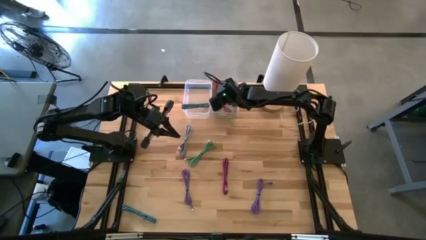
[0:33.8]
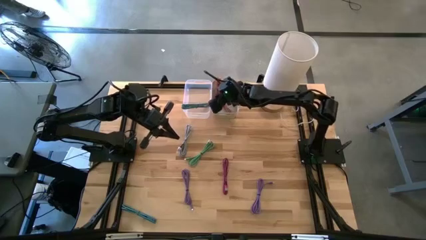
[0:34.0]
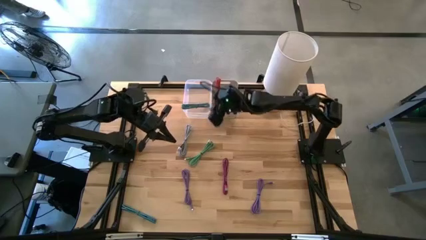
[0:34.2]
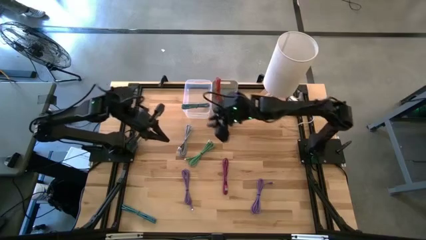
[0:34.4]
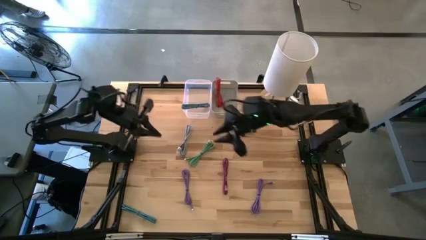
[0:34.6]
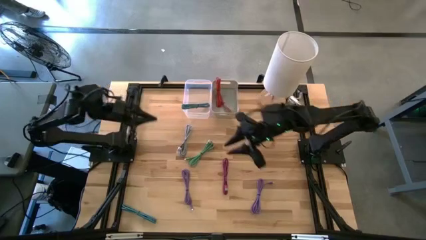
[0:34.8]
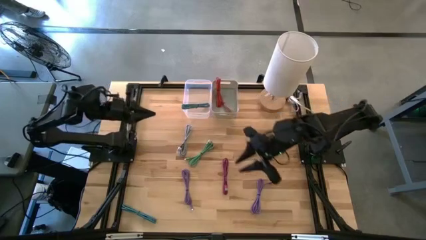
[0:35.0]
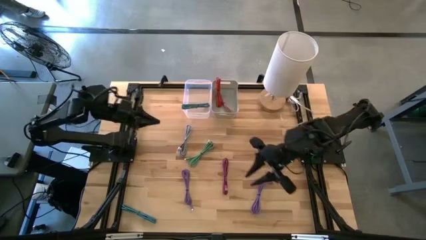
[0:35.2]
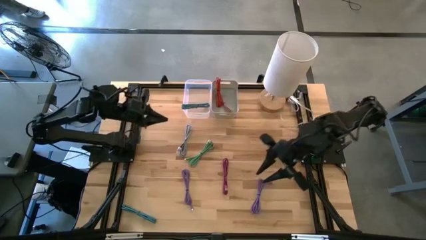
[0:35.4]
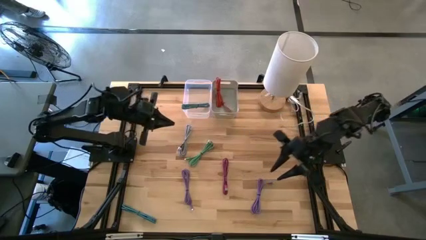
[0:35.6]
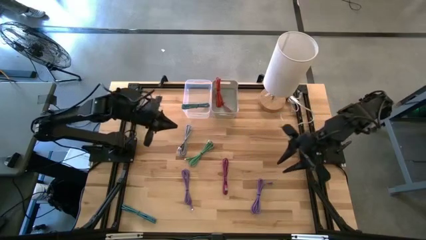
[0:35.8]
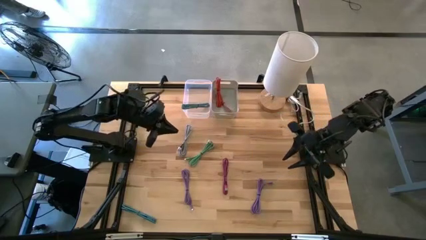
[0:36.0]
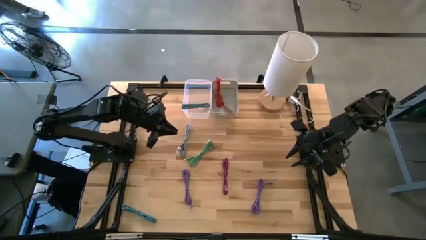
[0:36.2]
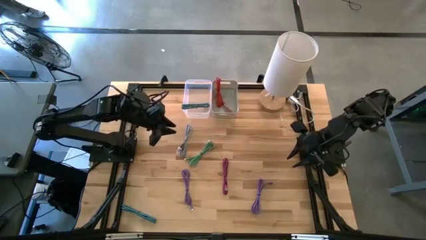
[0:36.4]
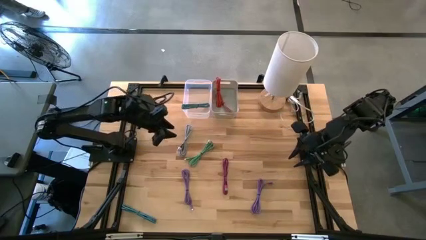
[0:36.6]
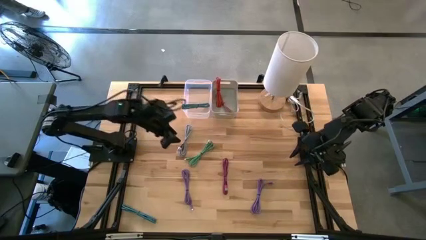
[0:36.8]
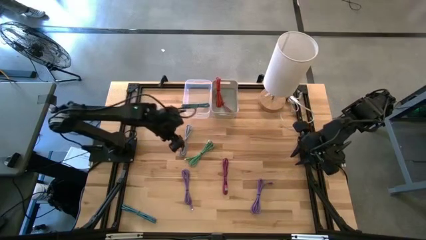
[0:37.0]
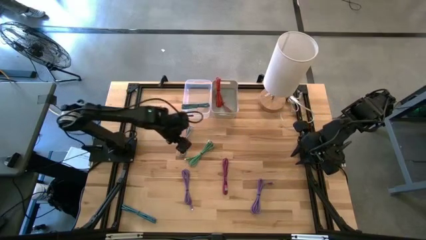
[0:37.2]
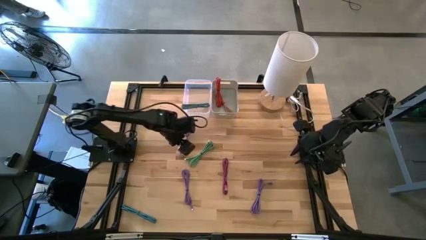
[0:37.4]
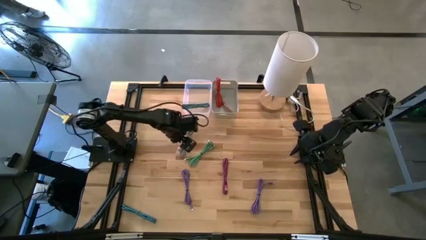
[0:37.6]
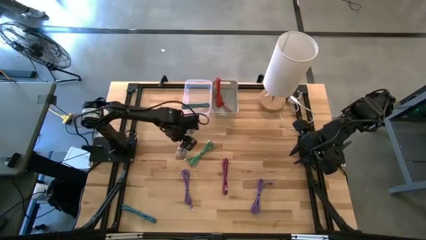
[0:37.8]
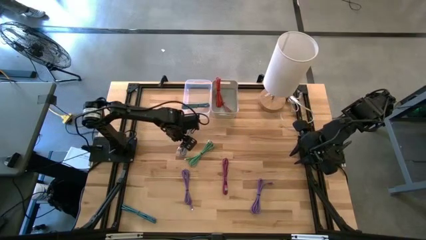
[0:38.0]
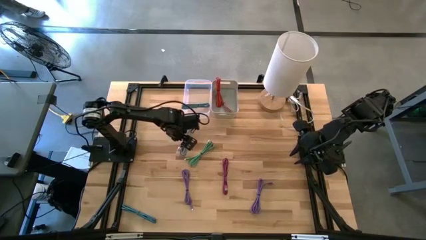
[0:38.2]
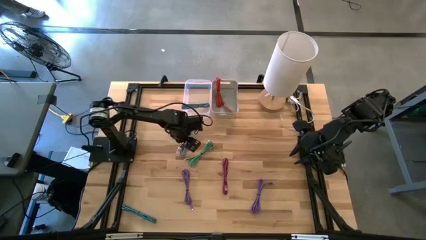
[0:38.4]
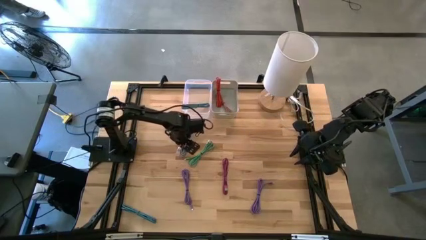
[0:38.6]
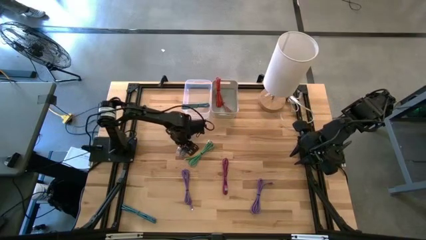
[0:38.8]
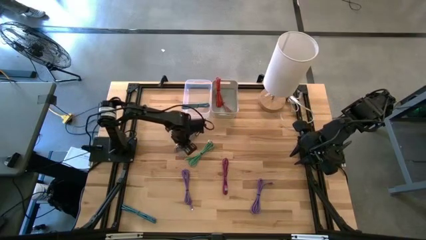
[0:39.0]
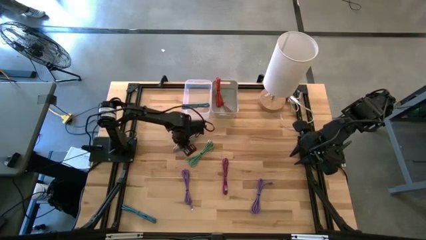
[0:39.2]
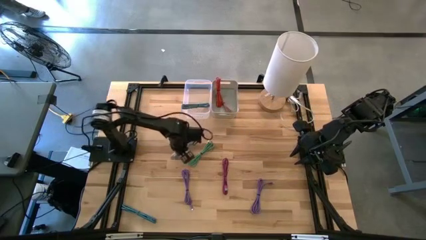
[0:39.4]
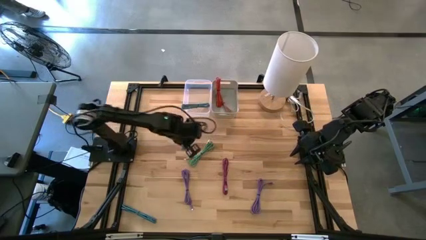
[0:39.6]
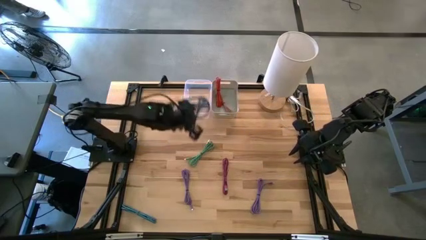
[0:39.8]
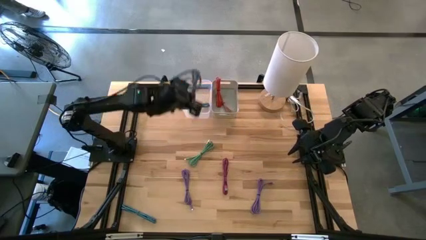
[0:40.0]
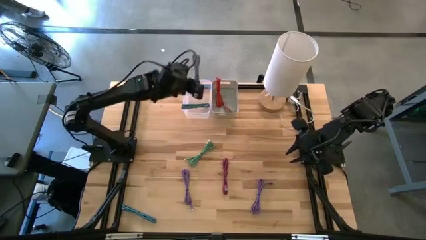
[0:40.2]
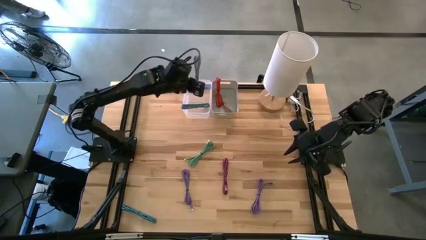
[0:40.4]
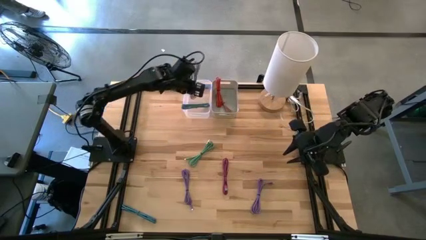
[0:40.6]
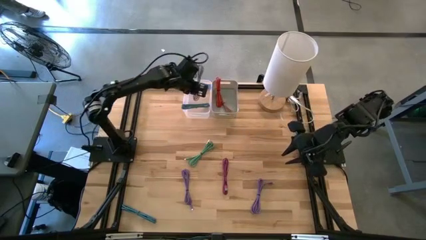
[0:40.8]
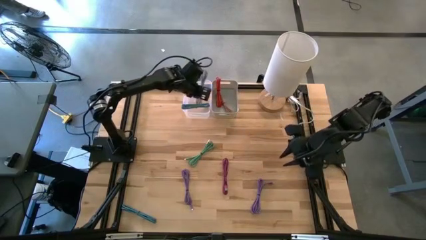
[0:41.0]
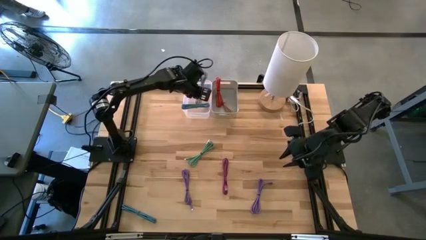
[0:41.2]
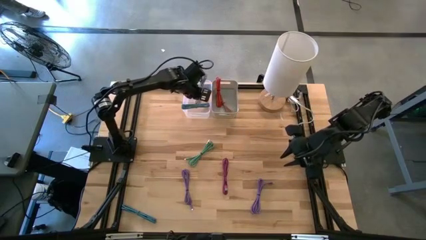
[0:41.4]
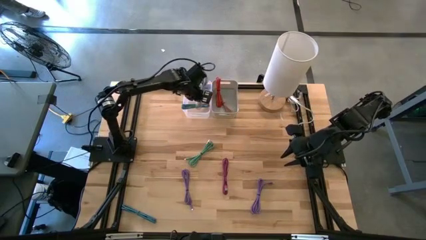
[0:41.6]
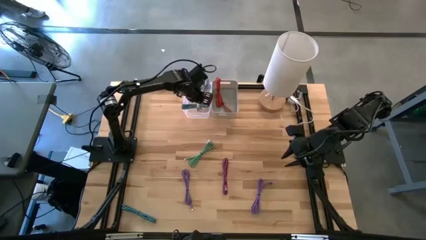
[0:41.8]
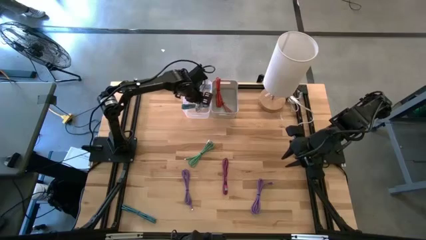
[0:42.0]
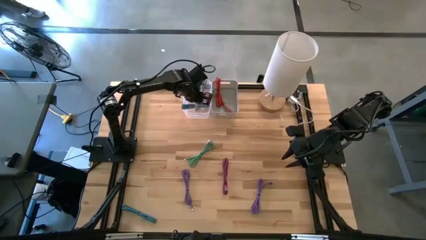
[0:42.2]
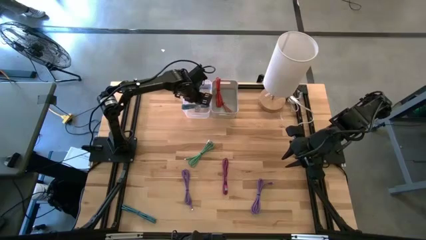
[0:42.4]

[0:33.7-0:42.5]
Task: Pick & Place USB Port
Put the white and black charger cable into the transparent bin

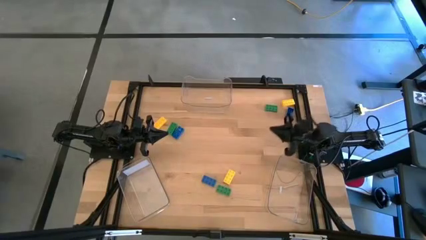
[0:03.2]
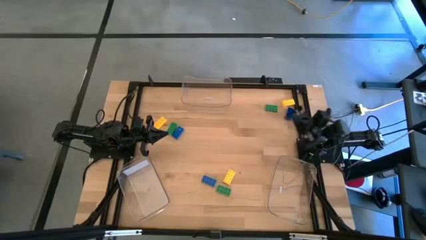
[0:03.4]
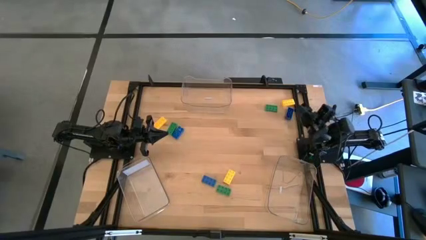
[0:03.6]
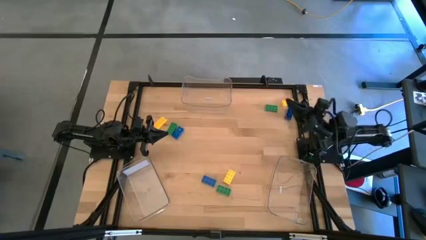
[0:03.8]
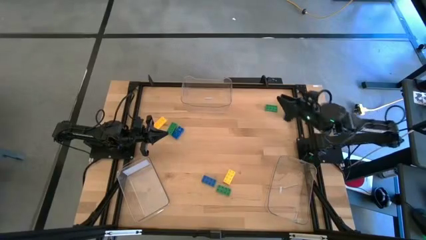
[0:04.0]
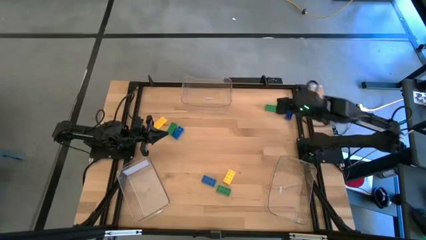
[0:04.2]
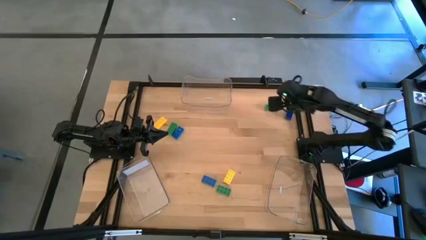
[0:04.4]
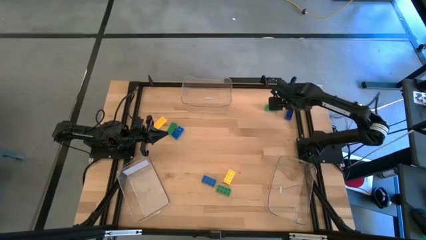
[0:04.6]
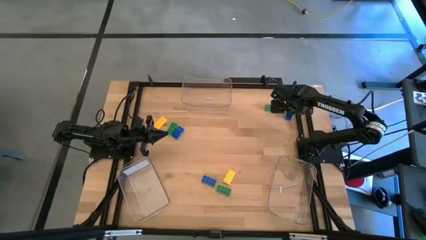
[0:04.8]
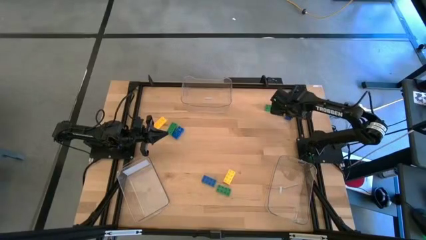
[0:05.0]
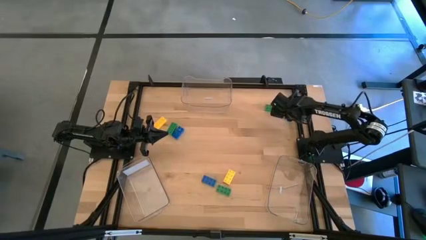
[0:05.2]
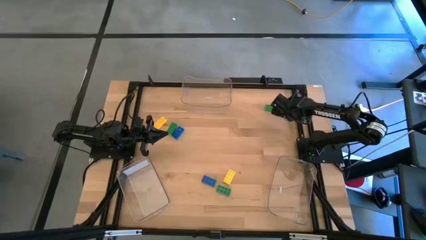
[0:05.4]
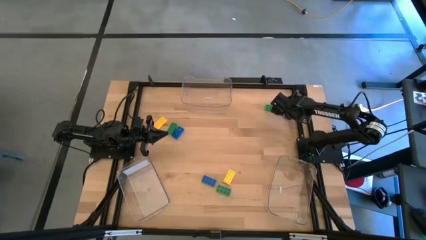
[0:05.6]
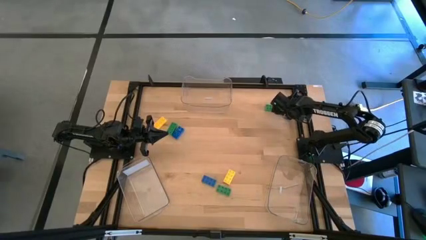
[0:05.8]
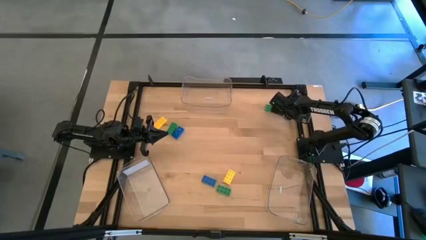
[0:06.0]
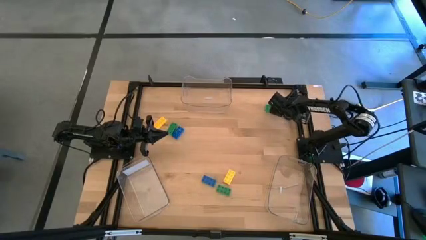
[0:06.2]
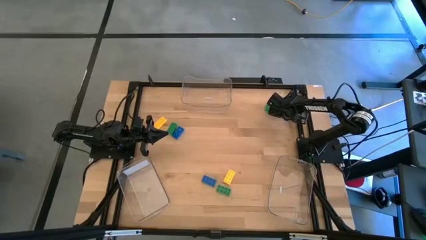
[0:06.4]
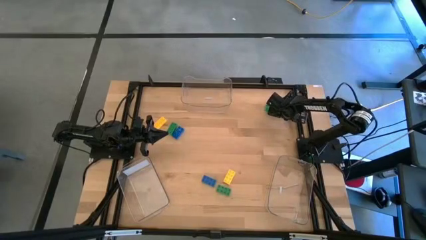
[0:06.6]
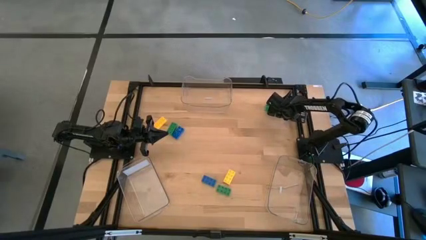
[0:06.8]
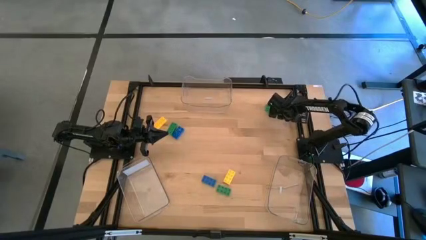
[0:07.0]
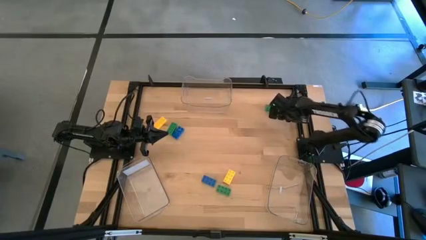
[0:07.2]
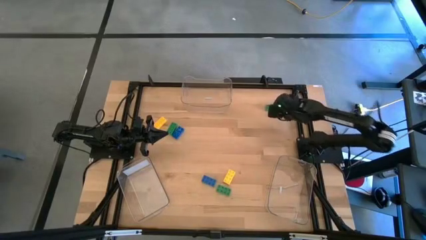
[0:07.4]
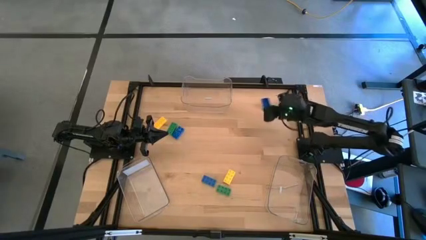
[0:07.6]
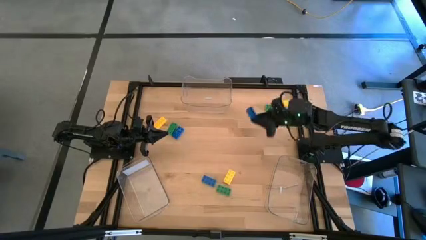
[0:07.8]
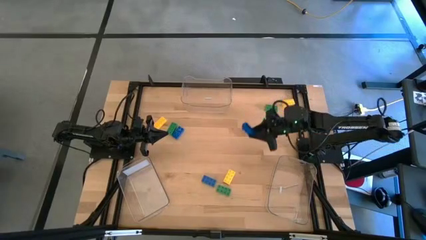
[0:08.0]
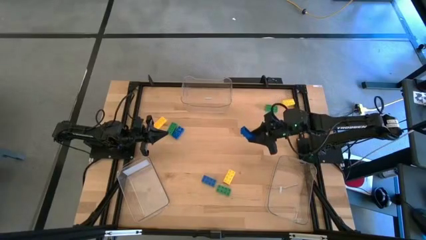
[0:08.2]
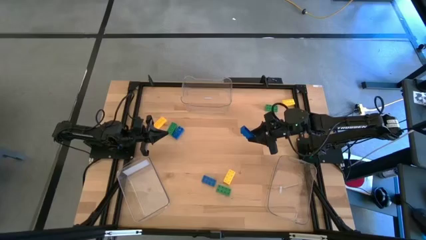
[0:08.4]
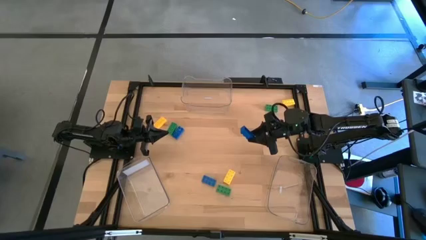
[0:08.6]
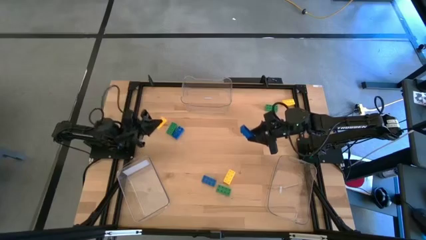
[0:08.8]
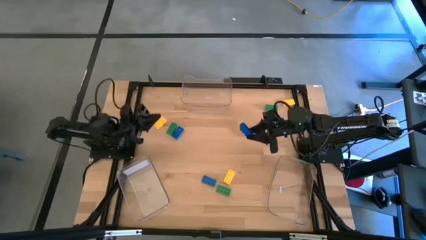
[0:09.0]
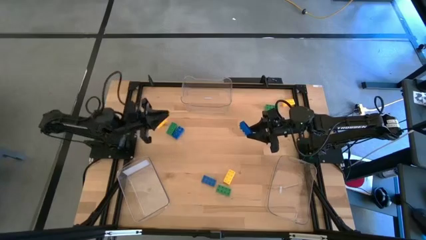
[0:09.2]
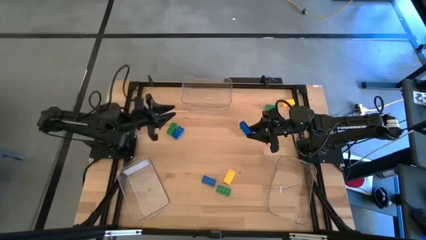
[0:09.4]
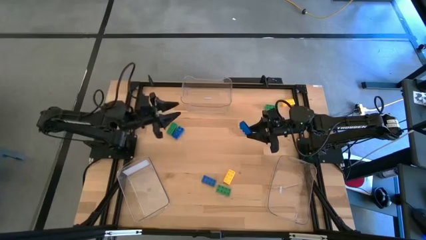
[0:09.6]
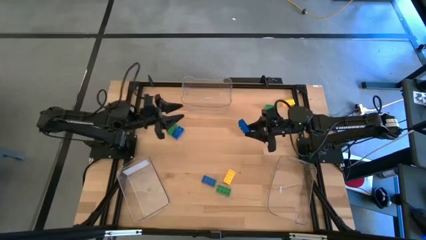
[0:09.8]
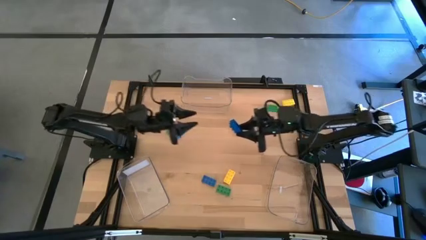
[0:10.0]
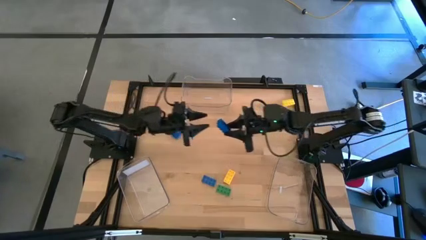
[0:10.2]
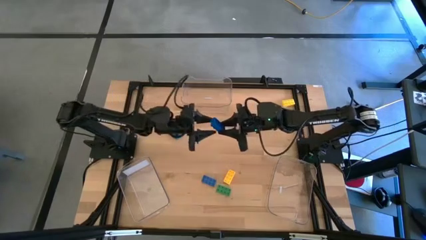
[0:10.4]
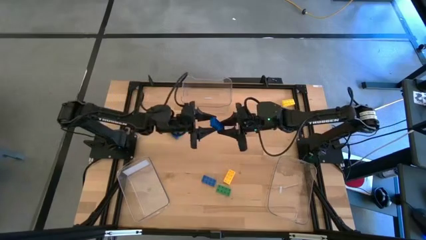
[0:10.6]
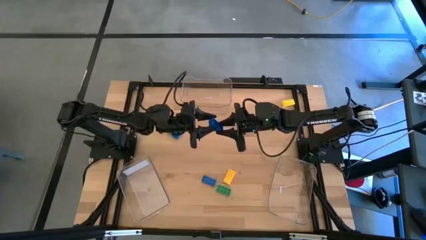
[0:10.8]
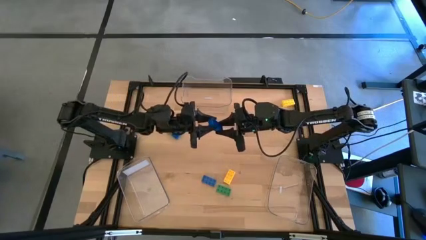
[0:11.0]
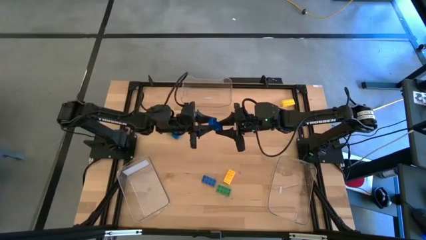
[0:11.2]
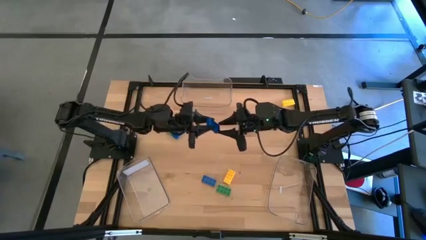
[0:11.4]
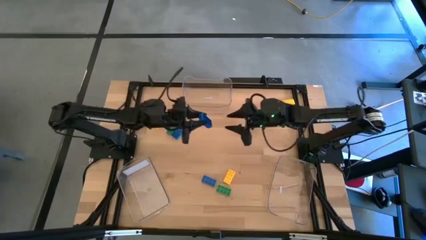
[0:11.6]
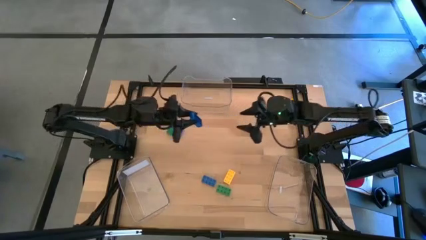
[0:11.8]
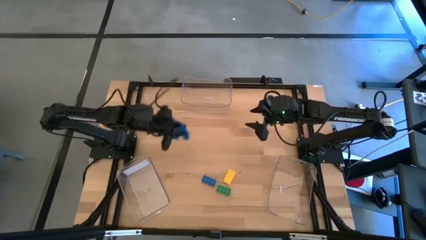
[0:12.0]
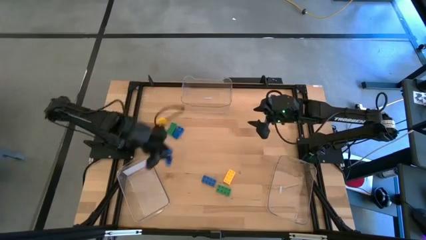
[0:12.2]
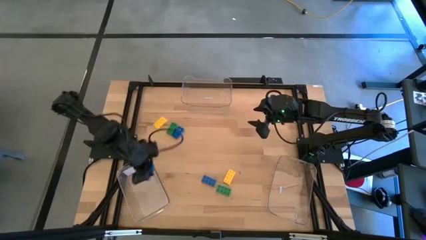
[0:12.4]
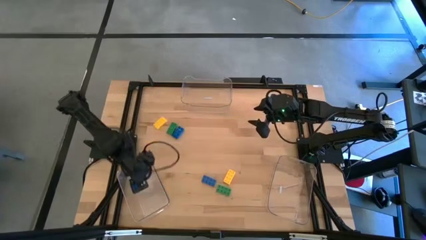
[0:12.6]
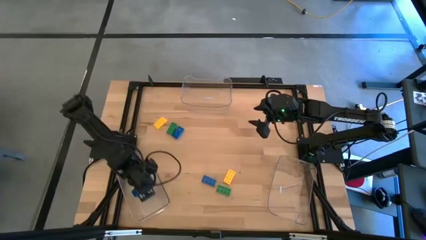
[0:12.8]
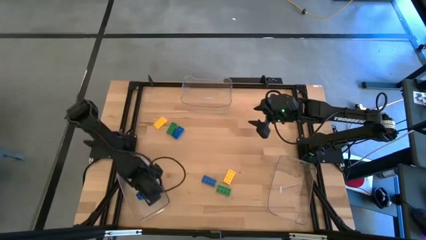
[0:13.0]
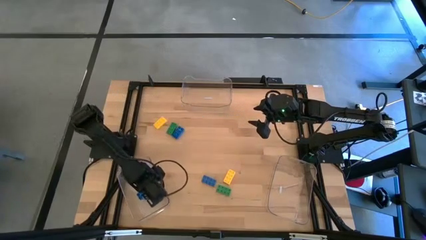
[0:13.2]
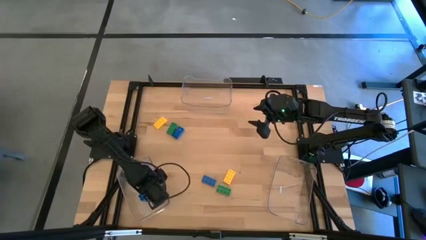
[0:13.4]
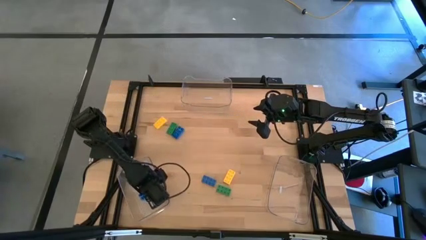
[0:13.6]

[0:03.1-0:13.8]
Task: Sort & place blocks by color
Put the top right blue game piece into the bottom left transparent bin
